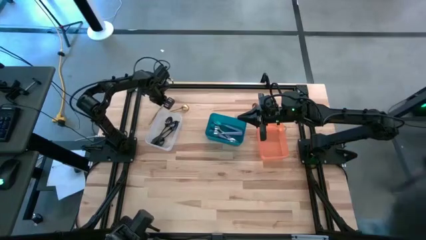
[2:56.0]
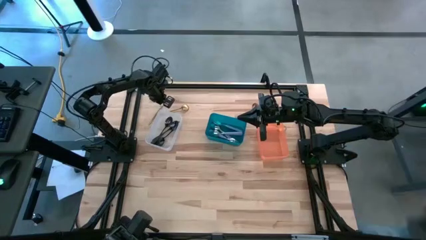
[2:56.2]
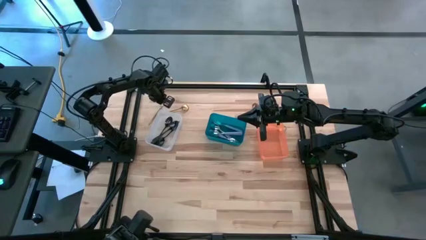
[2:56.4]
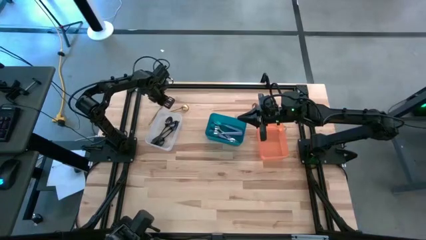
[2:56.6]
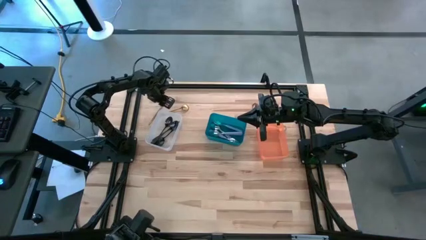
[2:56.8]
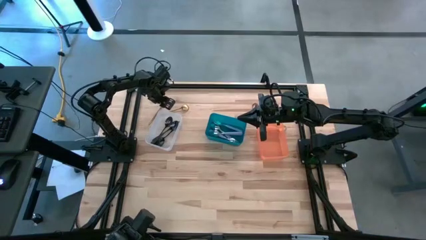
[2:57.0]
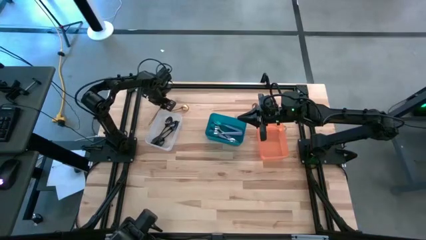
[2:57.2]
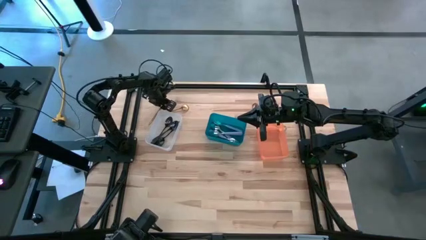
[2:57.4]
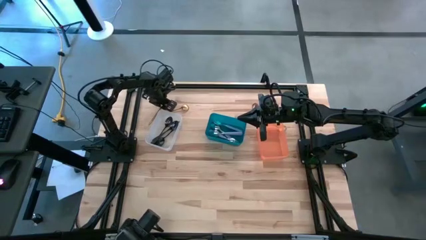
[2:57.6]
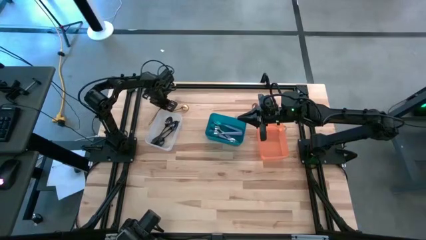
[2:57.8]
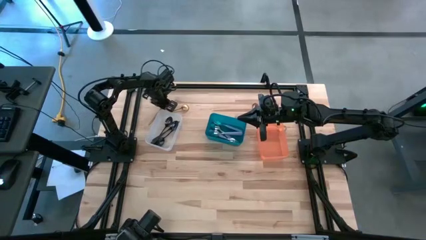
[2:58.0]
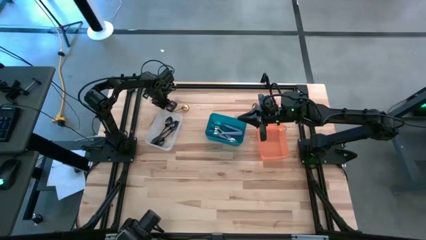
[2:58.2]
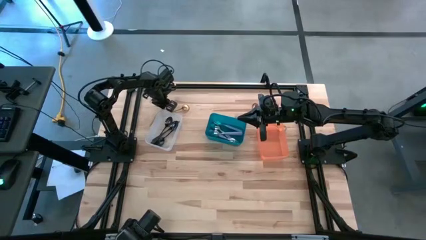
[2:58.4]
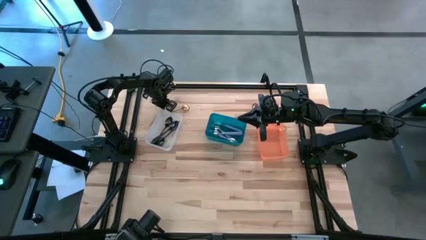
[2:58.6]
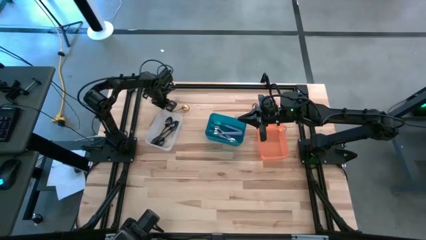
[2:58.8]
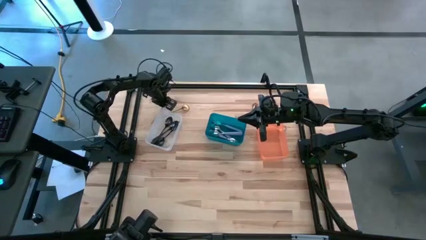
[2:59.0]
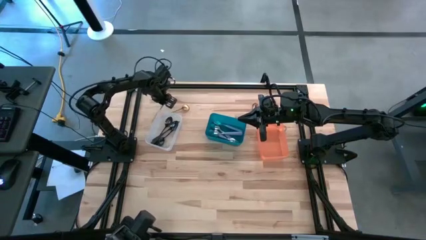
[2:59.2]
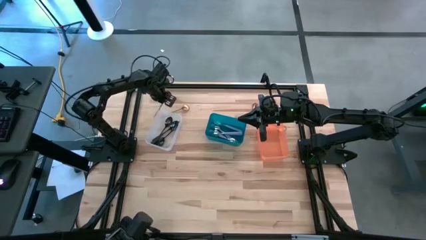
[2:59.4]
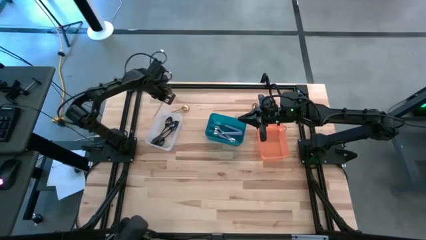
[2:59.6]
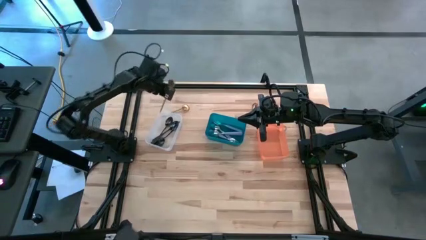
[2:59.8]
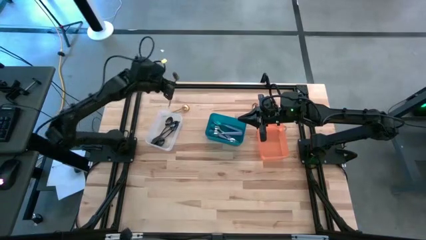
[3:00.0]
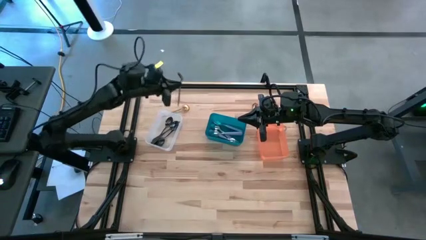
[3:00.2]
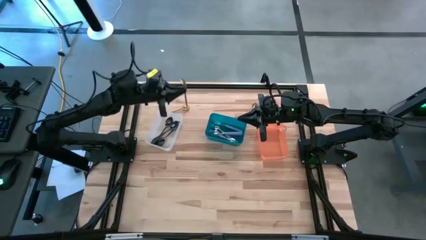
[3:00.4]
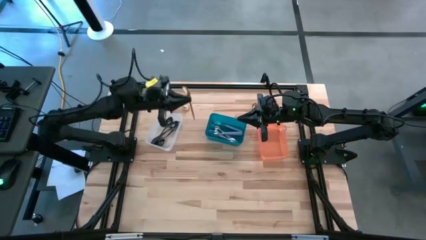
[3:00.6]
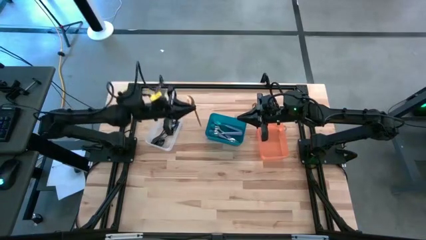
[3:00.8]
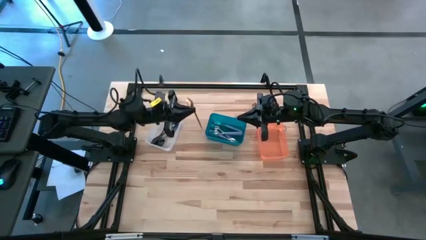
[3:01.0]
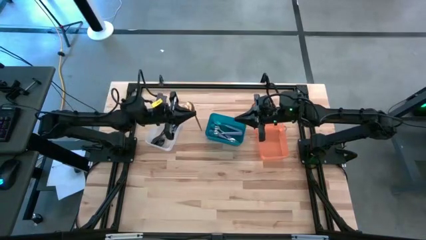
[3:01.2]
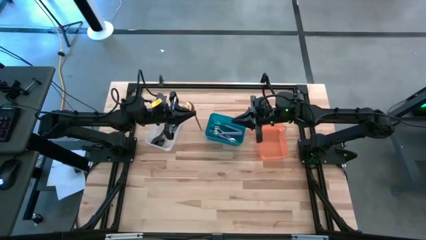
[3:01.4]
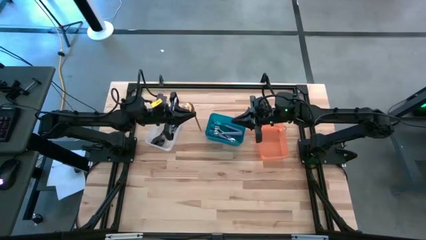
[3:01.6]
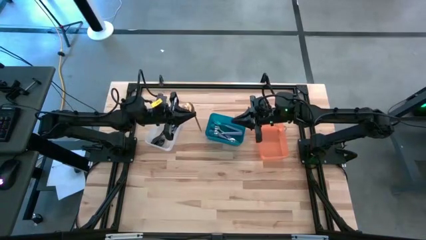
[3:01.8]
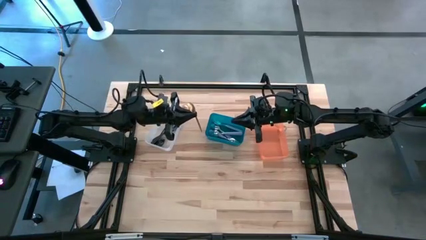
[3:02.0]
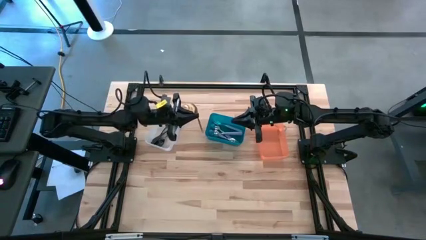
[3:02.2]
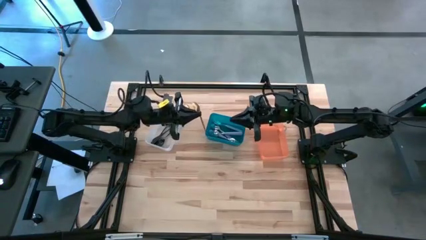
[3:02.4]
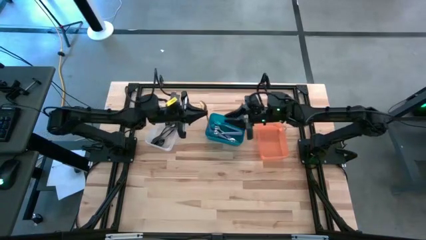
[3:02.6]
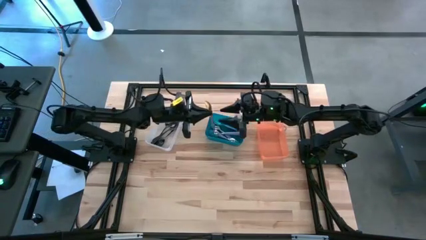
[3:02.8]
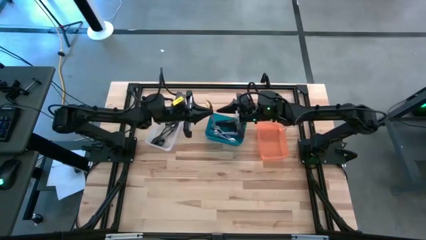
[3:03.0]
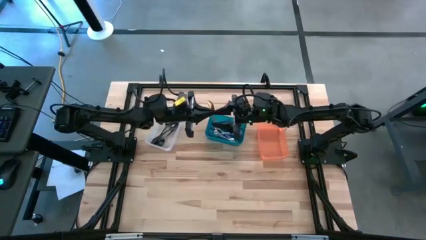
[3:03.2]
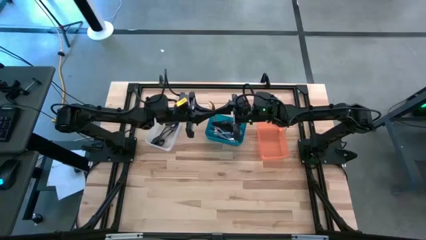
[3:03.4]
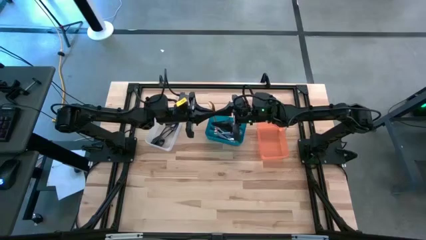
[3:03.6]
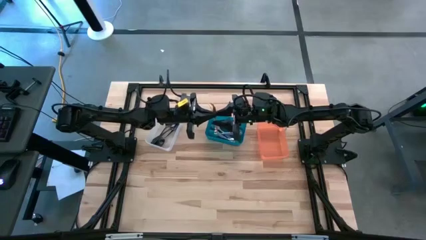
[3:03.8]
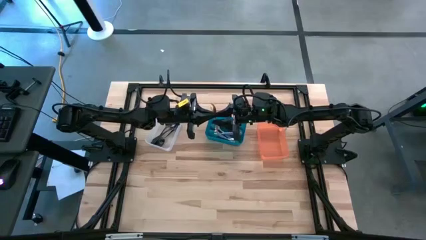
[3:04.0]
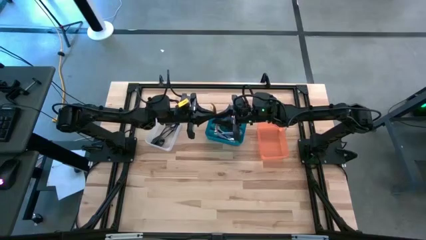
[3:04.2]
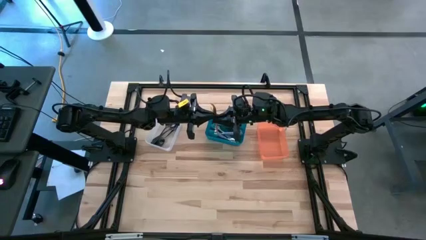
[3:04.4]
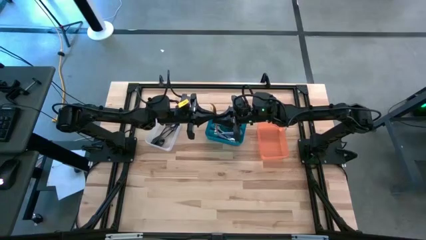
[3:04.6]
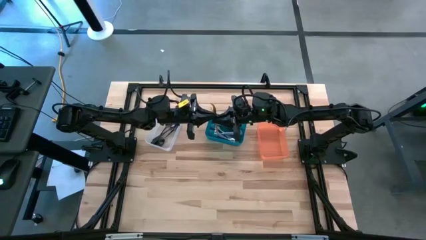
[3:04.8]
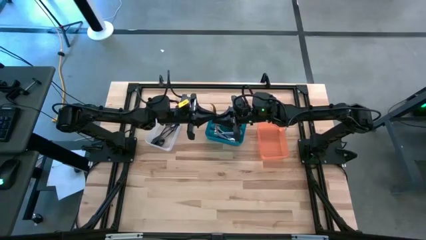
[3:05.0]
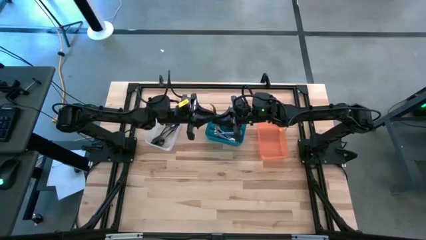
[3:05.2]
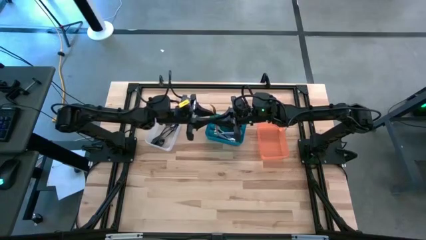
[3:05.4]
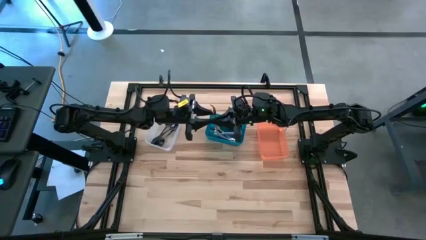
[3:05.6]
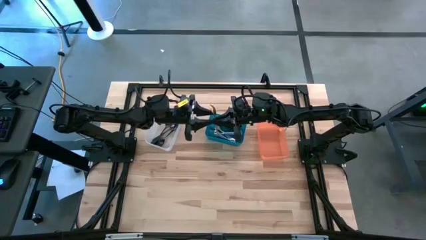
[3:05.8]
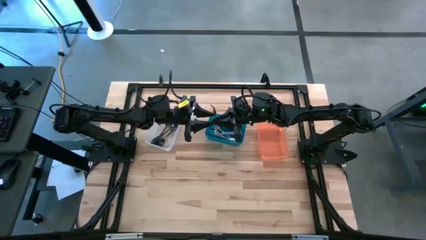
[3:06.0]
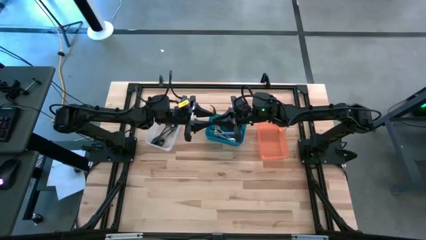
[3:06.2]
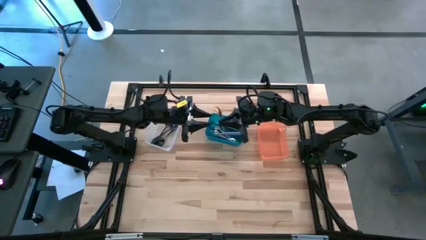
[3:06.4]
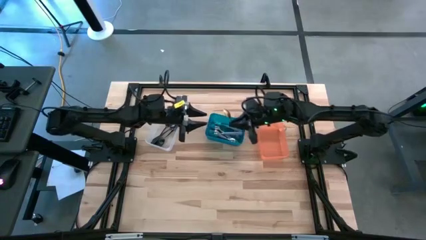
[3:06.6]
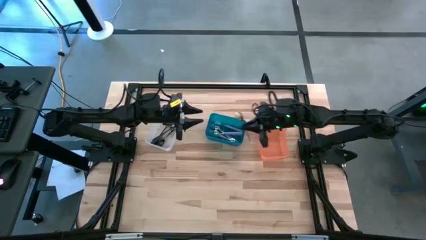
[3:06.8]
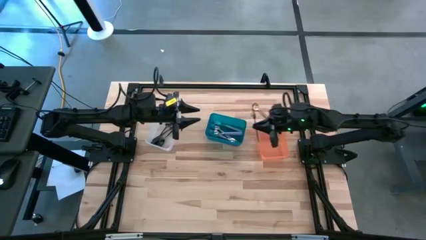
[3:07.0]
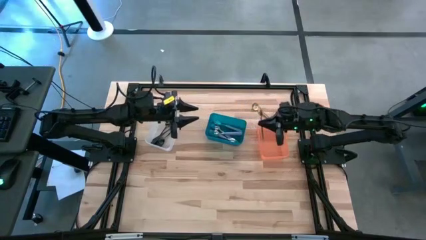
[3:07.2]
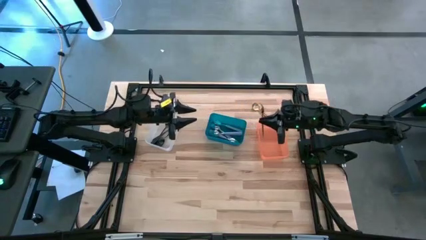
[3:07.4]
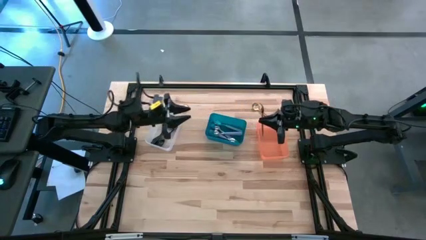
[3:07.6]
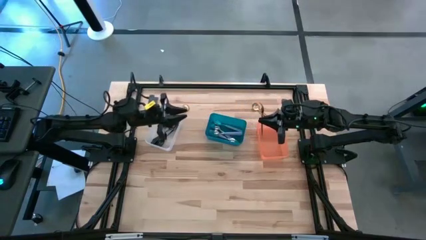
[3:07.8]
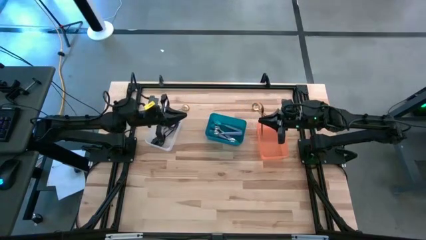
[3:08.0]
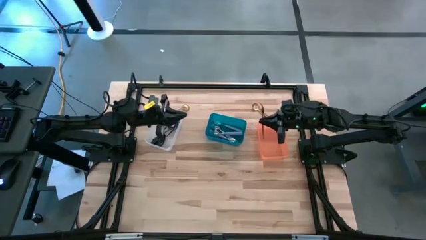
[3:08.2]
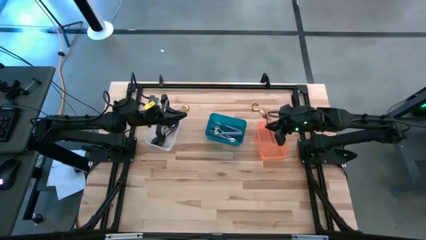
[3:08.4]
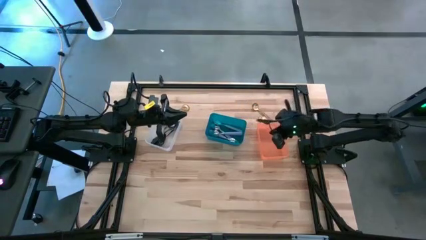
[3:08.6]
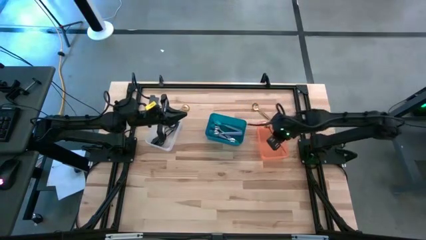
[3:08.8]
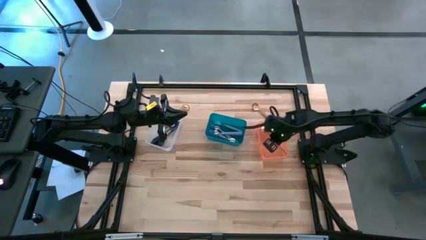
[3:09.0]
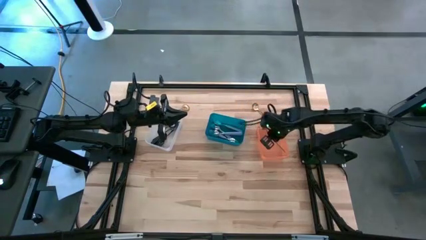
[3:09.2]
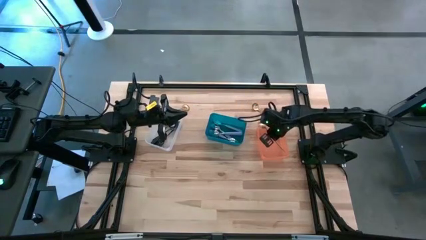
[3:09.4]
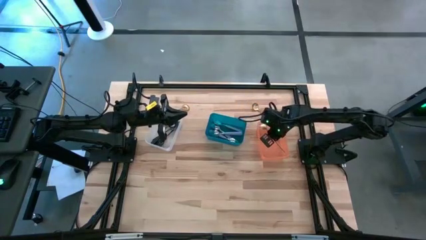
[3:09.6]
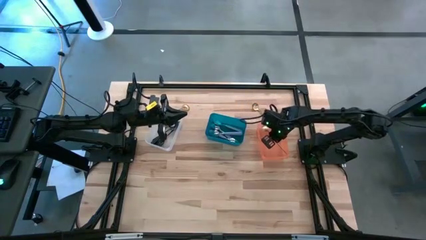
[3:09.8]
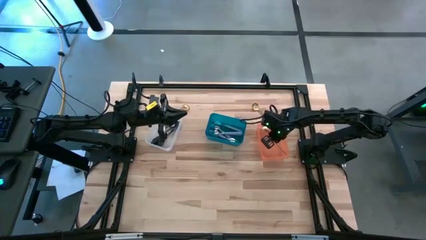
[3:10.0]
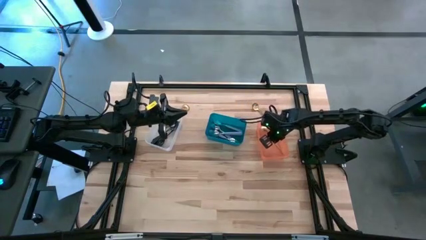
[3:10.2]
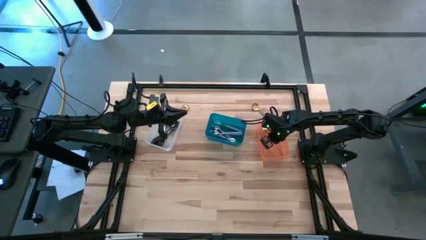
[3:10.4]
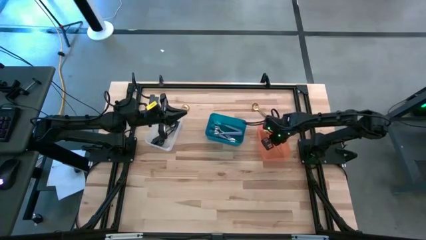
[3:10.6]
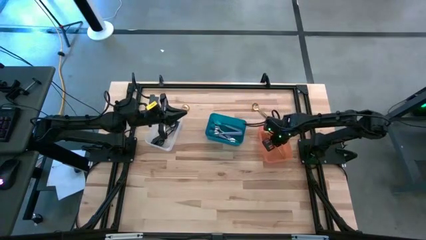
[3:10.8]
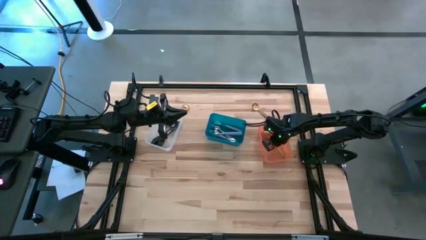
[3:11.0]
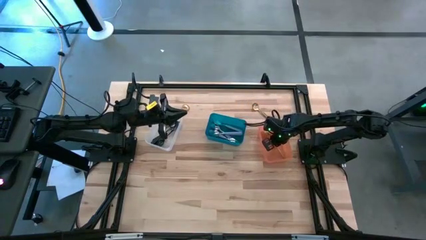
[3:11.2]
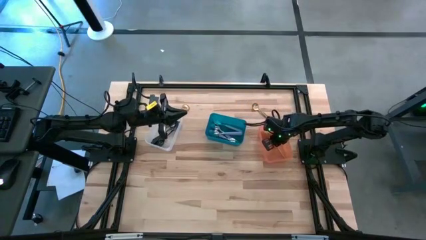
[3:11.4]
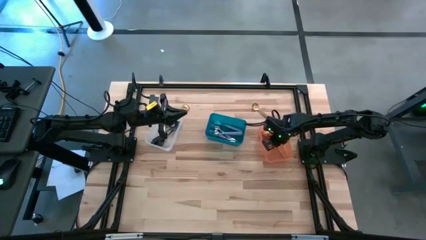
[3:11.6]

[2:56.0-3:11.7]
Task: Sort silverware by color (type)
Put the gold spoon into the orange bin
